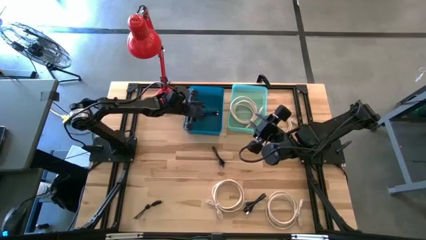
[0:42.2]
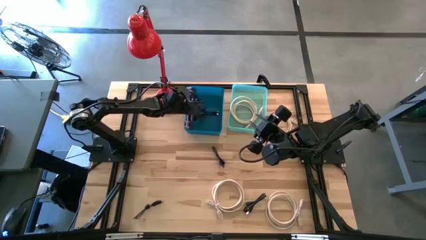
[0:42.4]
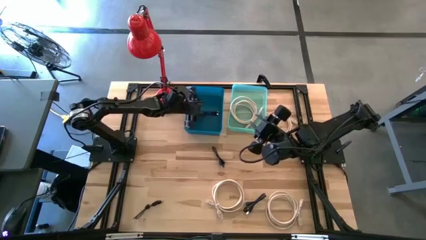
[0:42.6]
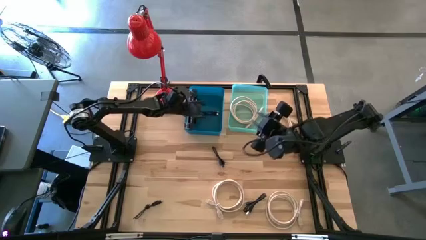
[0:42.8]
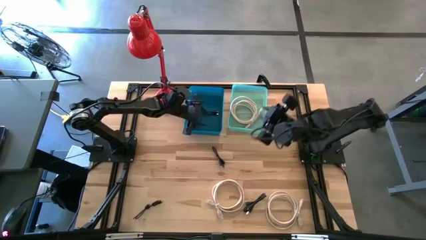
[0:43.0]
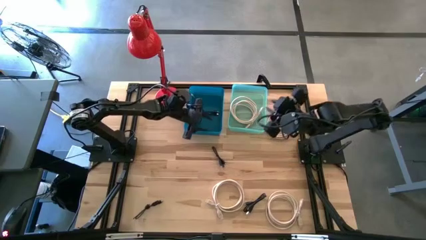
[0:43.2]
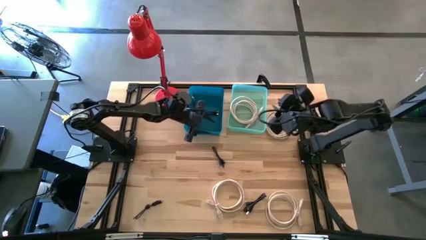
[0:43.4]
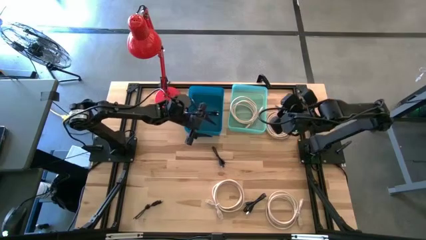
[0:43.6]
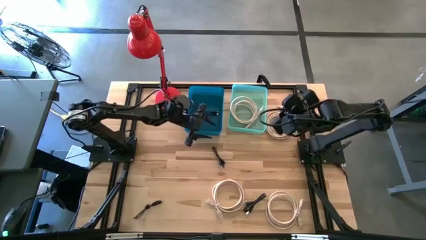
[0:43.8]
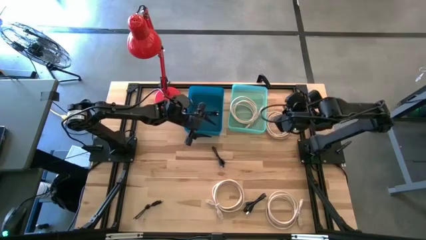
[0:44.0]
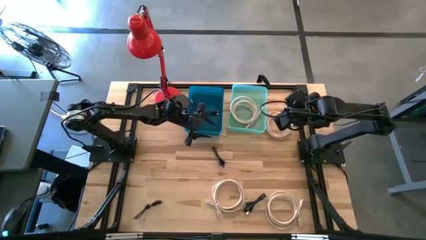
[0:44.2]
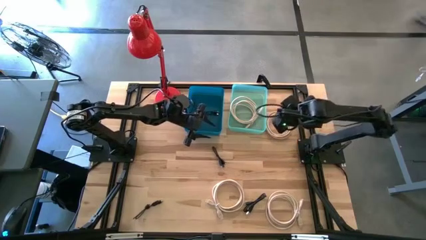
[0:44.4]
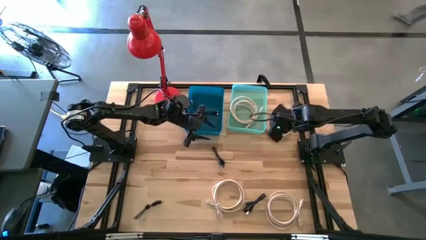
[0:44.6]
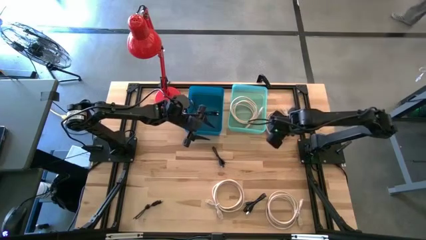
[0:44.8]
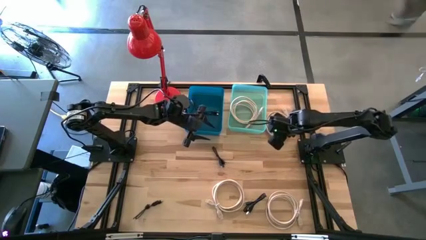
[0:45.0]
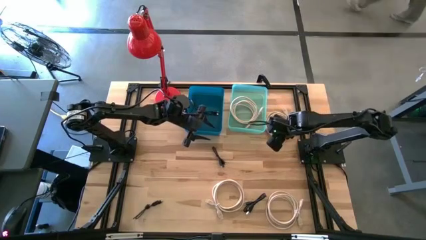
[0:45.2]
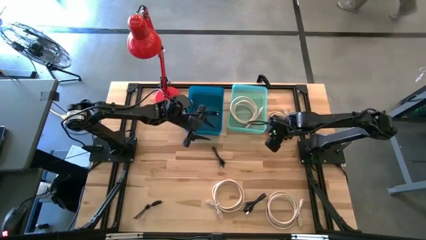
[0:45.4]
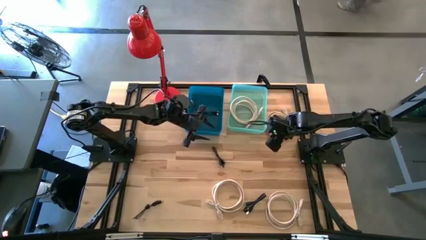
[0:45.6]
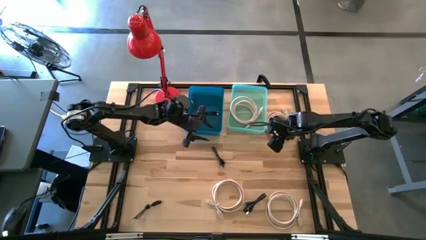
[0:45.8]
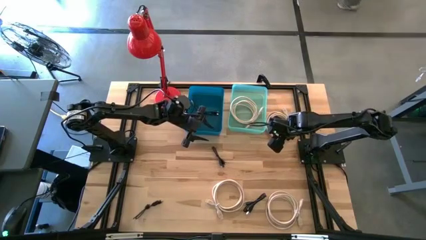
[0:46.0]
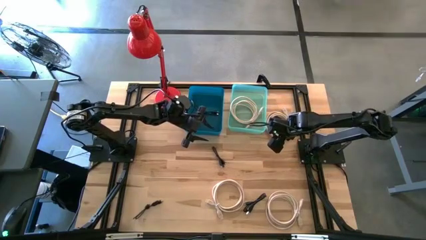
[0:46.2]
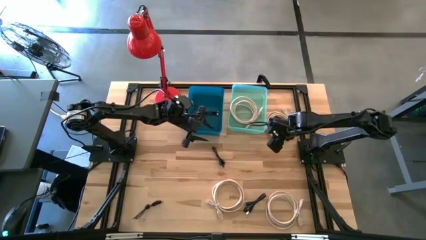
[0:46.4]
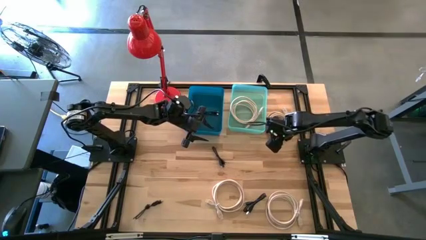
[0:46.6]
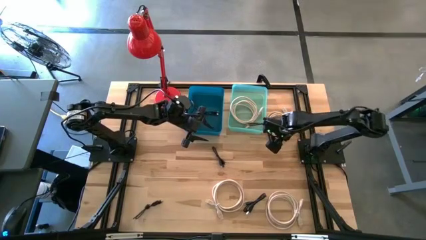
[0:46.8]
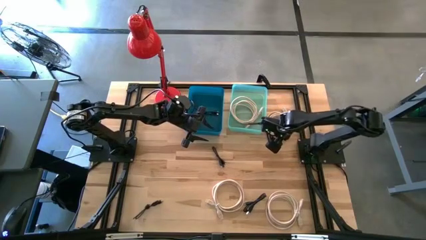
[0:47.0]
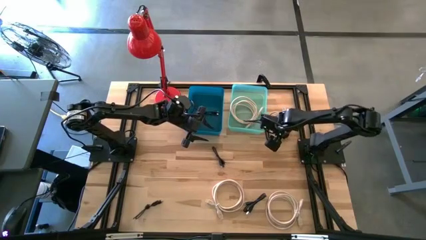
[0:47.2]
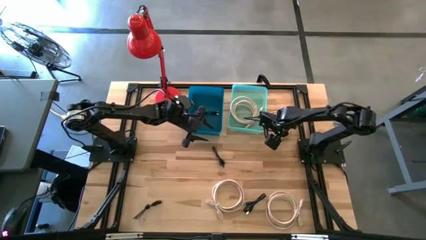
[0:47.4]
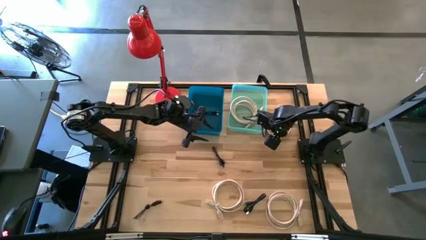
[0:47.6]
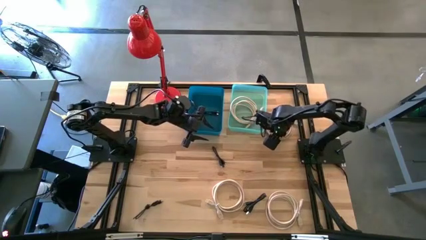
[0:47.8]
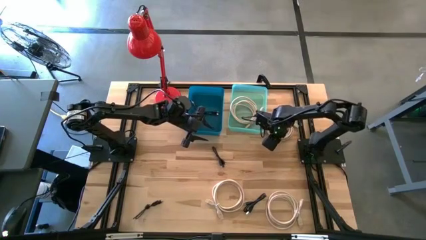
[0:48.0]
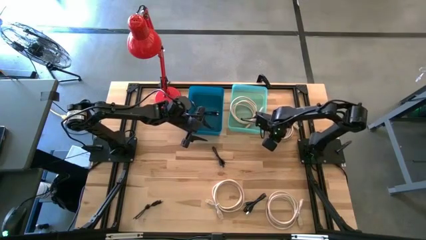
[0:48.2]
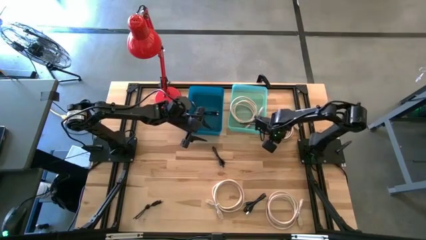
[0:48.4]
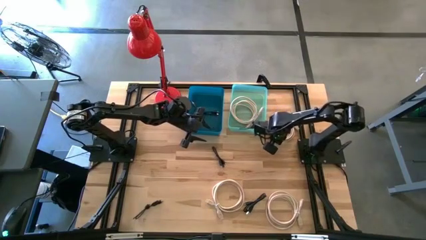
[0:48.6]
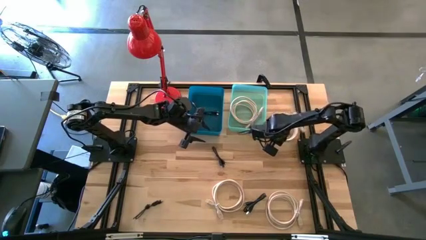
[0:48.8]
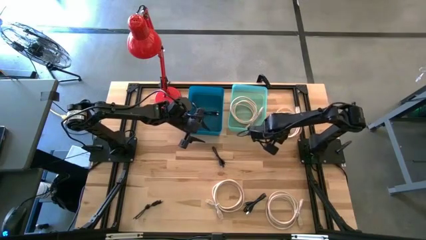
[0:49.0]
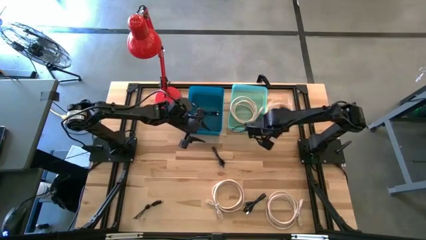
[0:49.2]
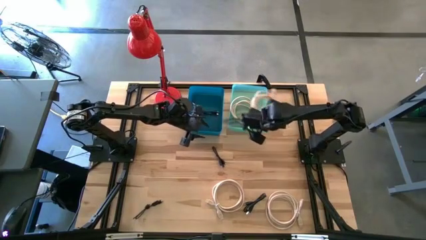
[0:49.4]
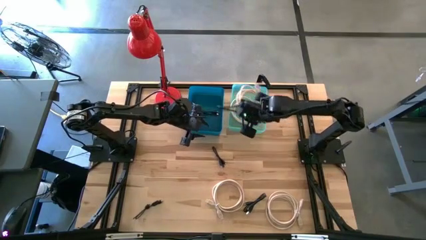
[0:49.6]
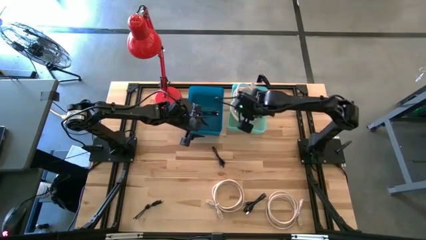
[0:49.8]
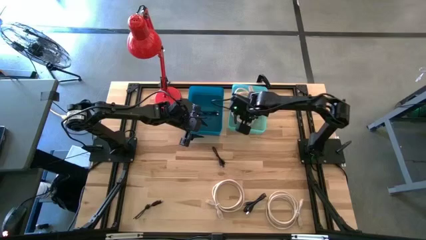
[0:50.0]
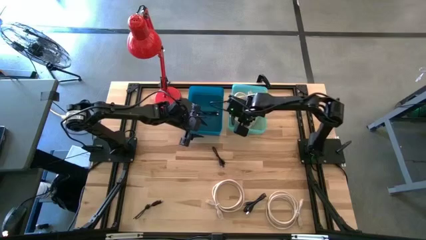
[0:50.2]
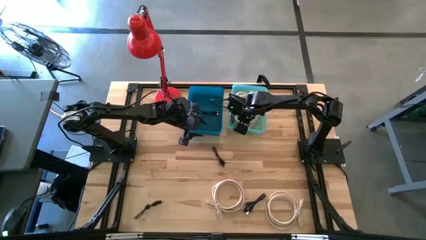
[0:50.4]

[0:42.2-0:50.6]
Task: Pick & Place USB Port
Put the light brown hdmi cable into the light green bin

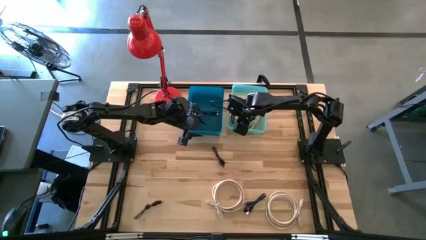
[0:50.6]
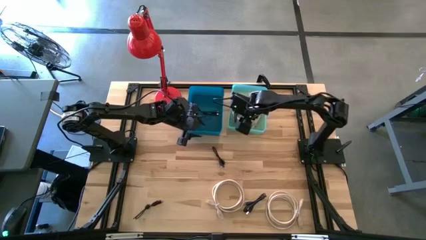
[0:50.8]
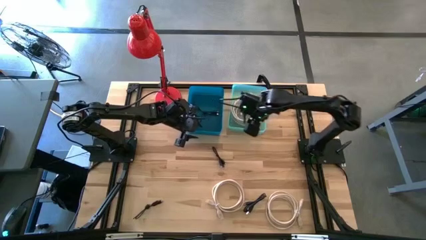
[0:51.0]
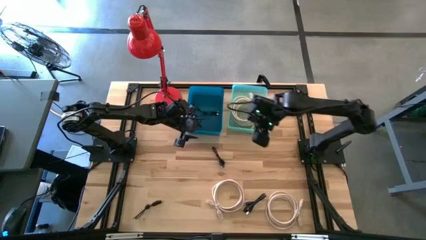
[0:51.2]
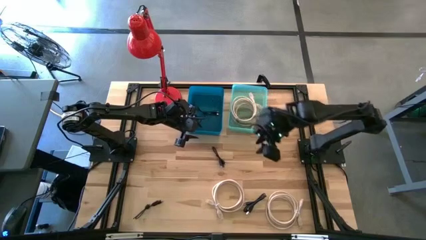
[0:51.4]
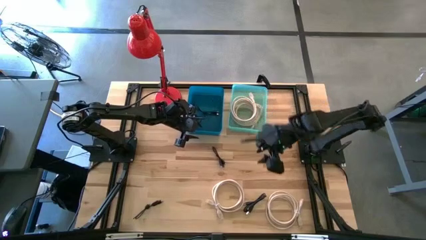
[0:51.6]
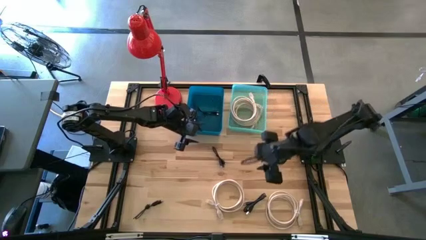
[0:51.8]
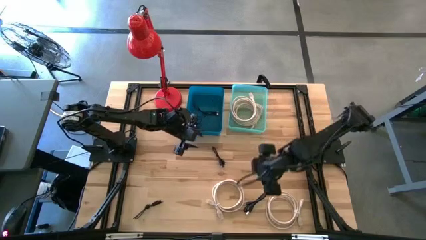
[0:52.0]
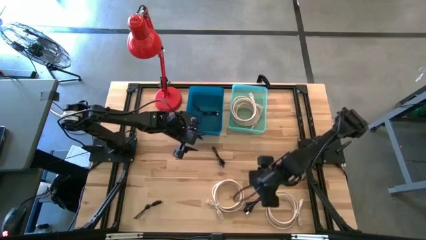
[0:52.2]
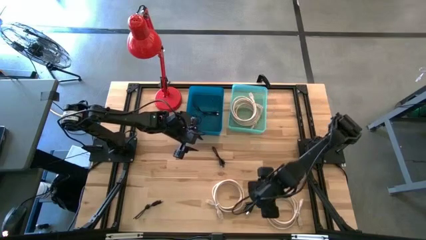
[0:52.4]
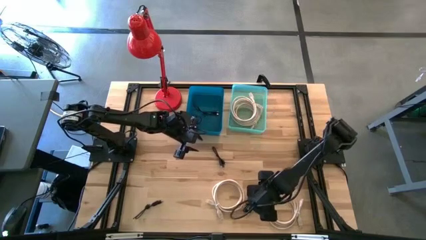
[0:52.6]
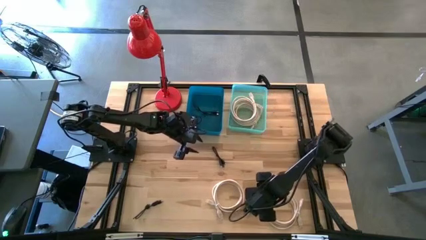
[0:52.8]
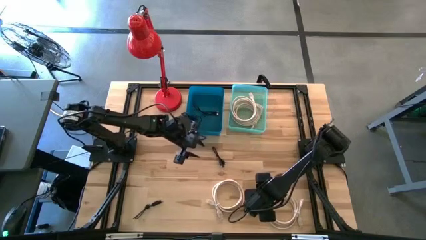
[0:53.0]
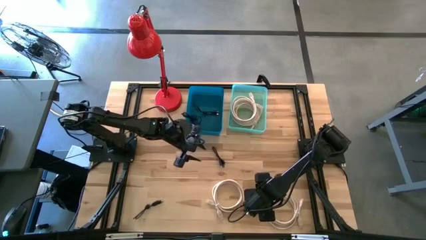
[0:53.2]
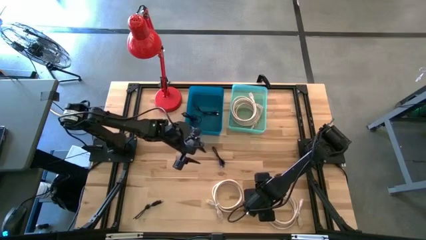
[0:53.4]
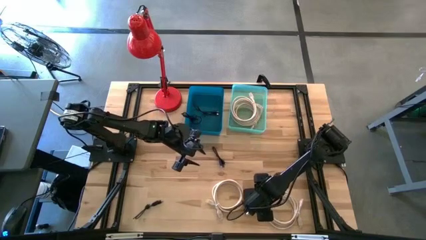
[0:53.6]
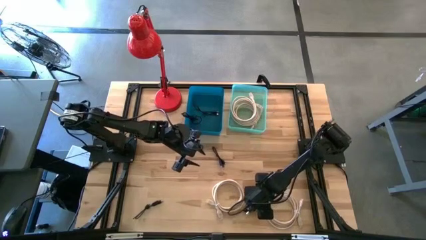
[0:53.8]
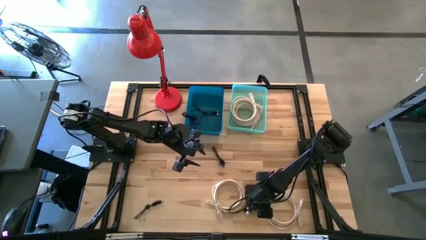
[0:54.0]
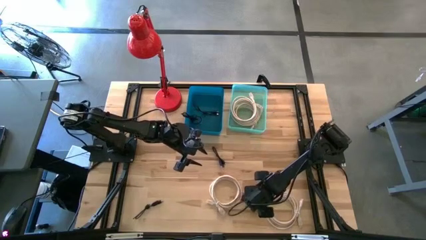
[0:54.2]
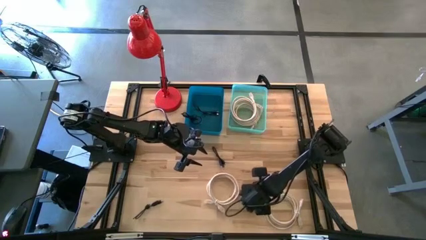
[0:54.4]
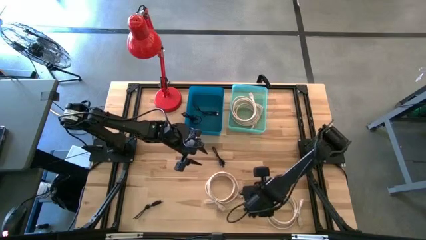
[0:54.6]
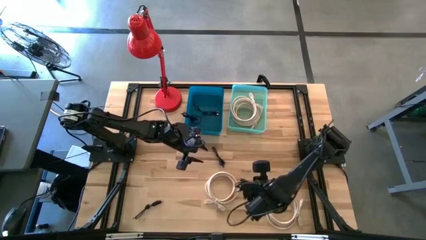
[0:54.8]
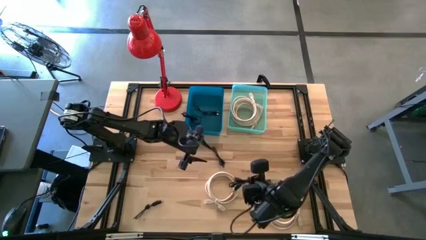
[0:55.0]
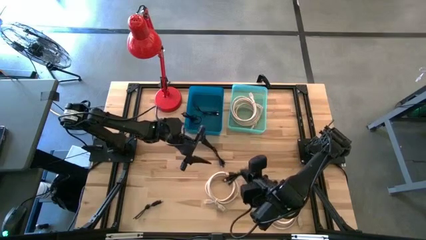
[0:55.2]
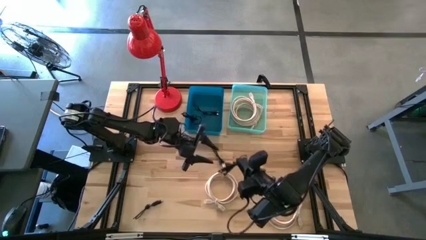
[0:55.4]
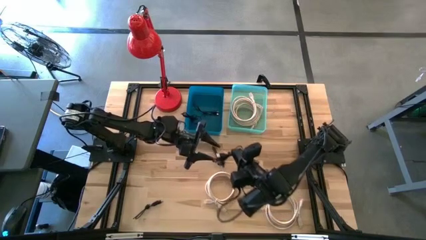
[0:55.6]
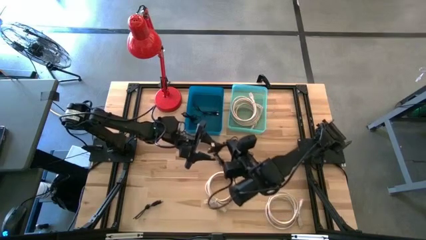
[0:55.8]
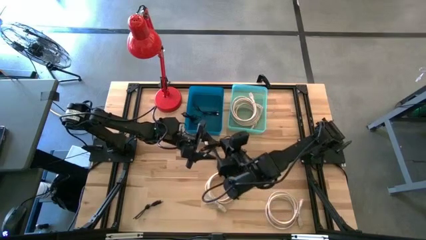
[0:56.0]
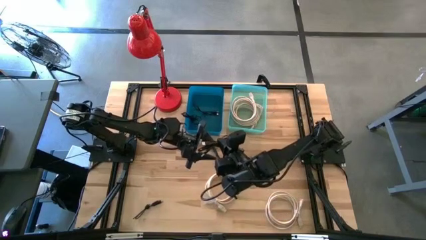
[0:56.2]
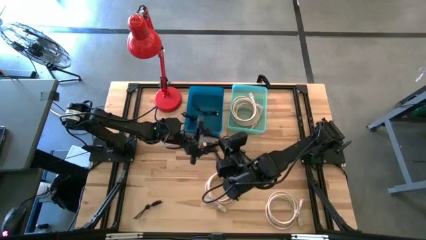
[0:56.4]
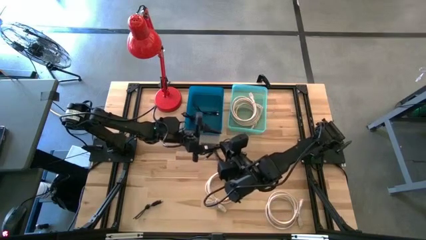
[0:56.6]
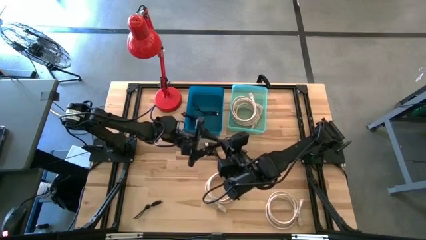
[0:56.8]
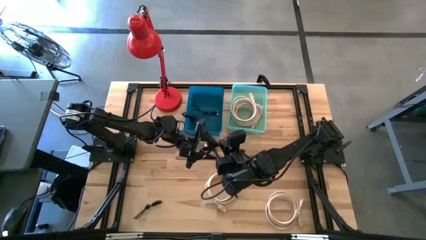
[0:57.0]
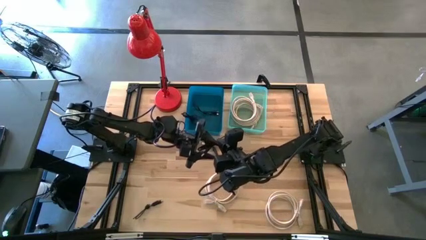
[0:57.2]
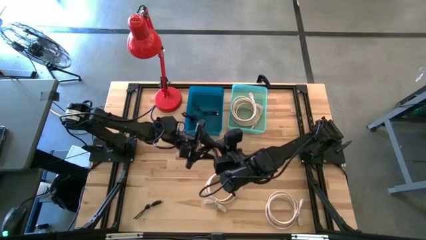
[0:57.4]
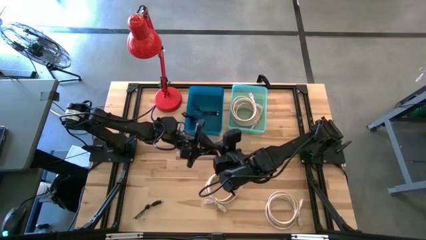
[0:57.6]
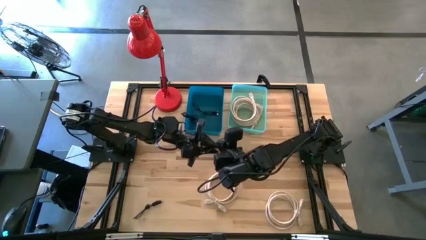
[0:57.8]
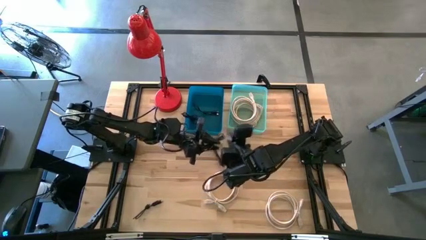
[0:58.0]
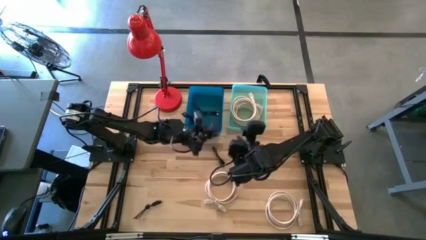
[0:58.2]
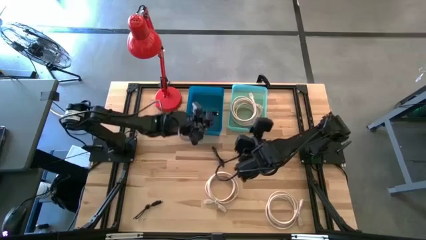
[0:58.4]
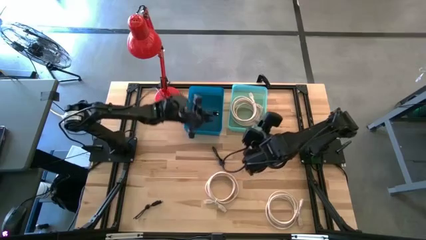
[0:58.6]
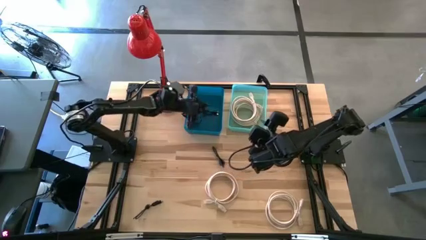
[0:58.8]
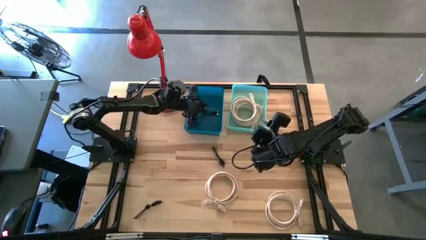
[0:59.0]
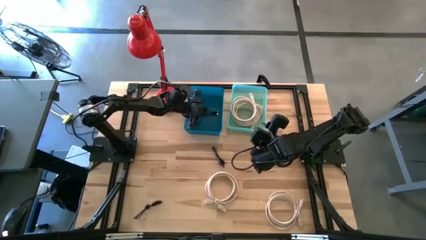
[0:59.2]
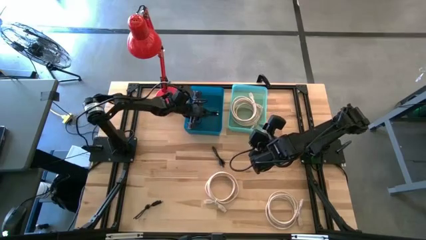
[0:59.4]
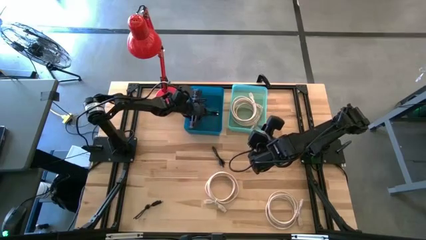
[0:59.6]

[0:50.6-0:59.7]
Put the black charger cable into the blue bin
